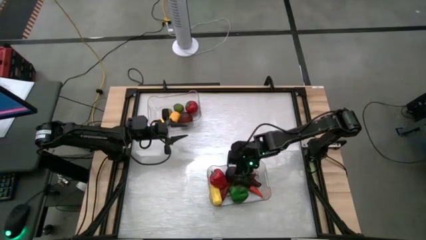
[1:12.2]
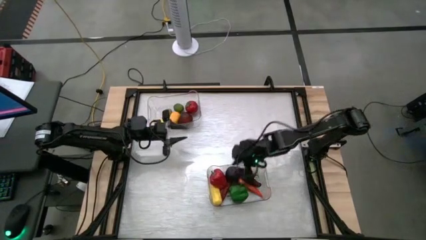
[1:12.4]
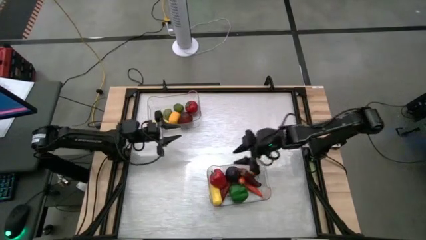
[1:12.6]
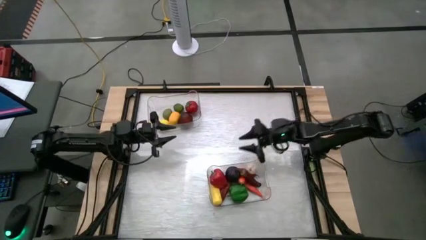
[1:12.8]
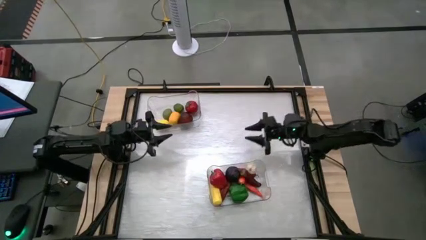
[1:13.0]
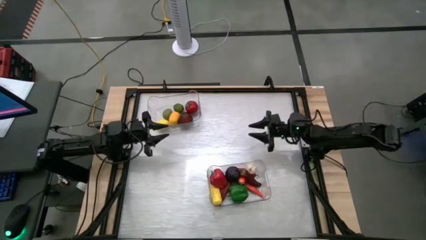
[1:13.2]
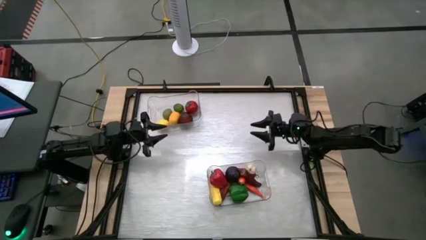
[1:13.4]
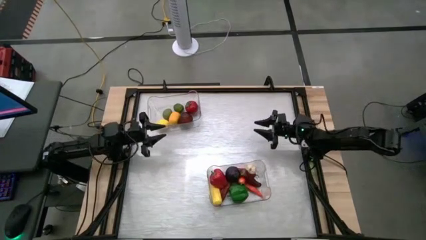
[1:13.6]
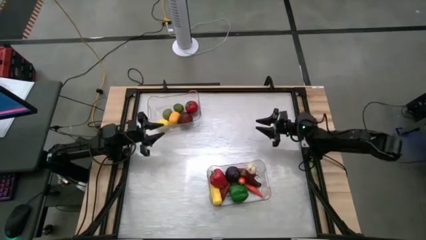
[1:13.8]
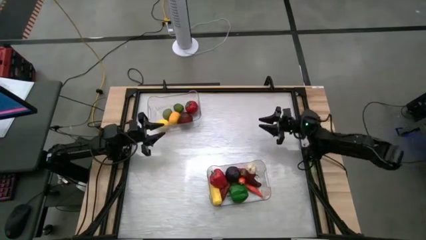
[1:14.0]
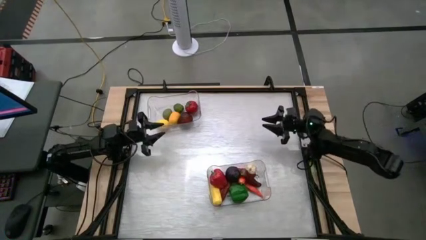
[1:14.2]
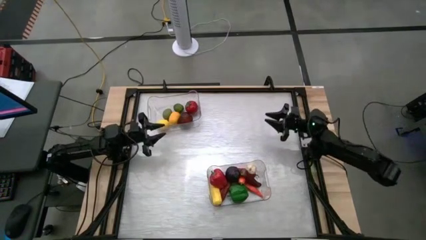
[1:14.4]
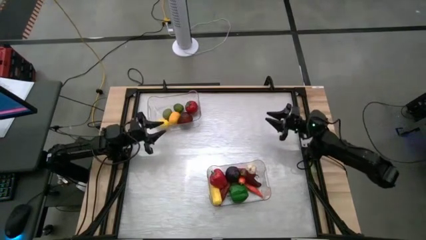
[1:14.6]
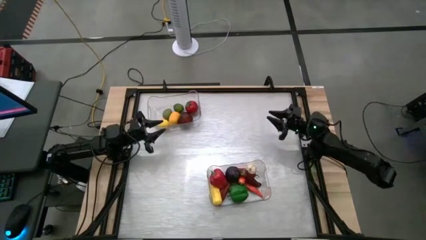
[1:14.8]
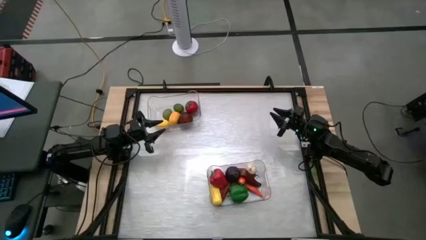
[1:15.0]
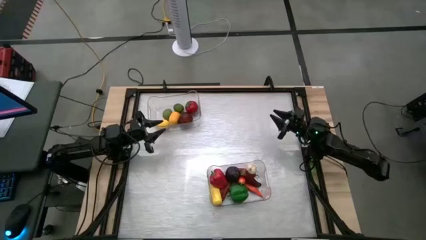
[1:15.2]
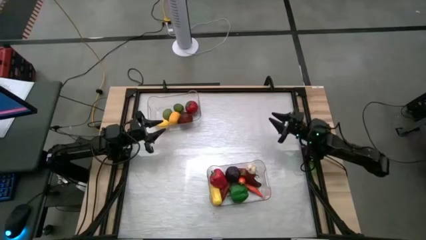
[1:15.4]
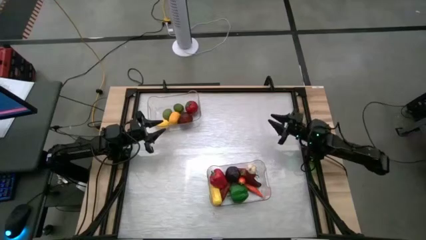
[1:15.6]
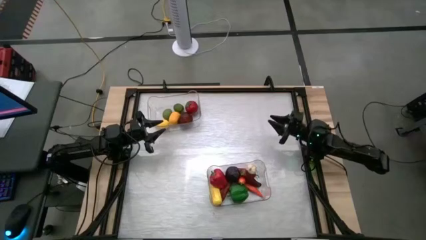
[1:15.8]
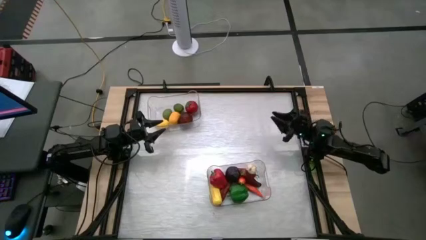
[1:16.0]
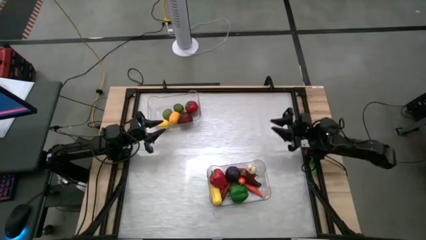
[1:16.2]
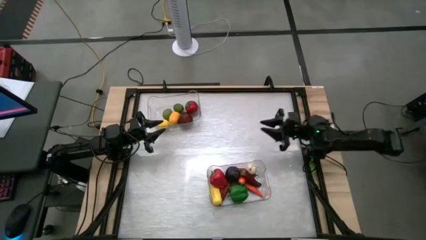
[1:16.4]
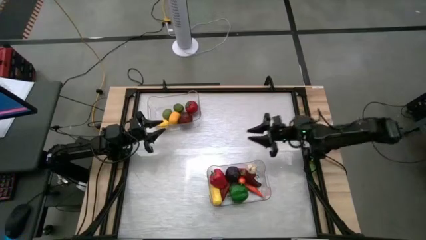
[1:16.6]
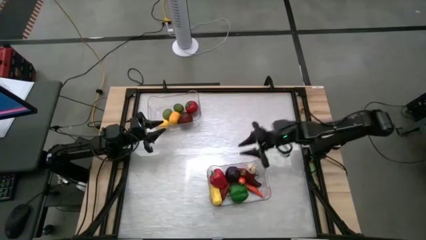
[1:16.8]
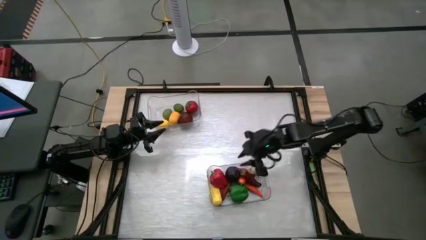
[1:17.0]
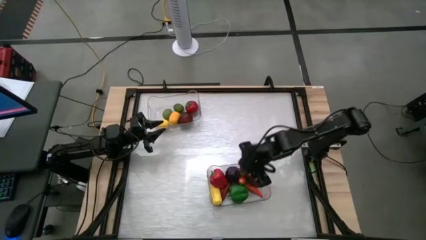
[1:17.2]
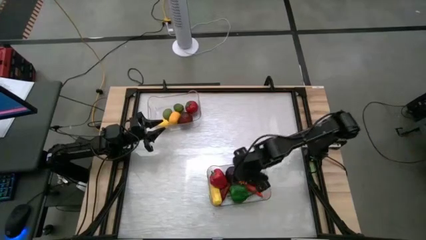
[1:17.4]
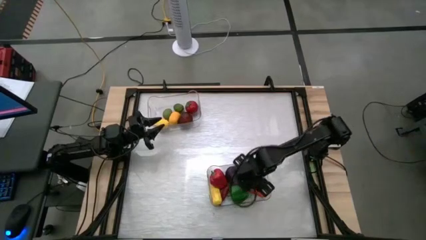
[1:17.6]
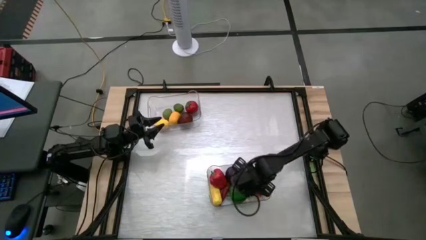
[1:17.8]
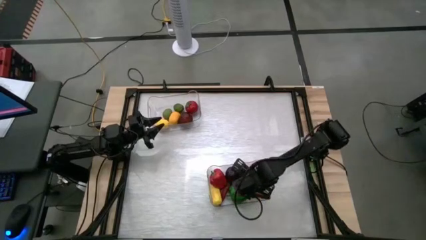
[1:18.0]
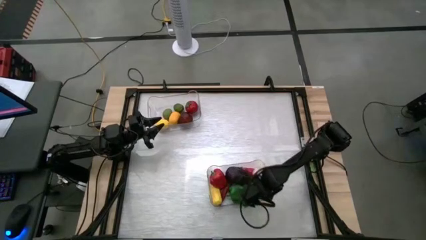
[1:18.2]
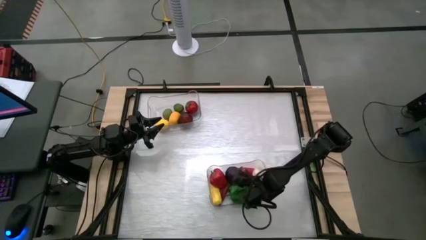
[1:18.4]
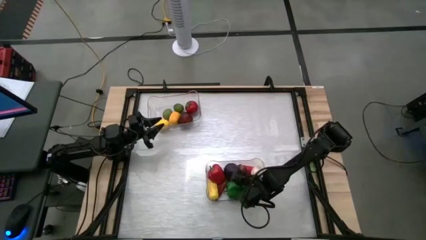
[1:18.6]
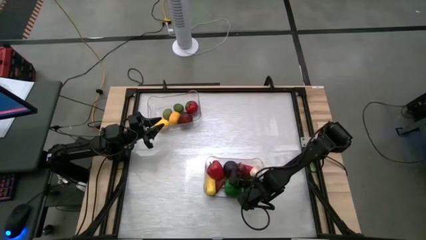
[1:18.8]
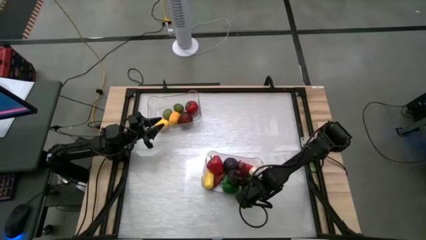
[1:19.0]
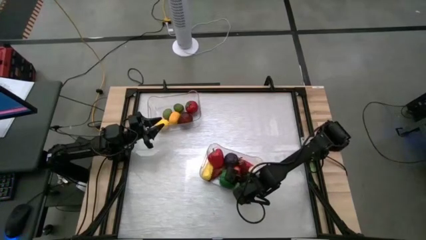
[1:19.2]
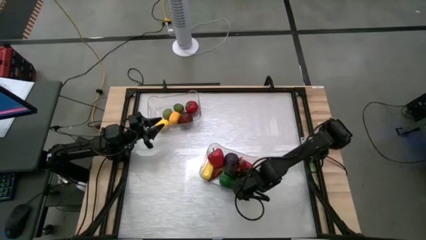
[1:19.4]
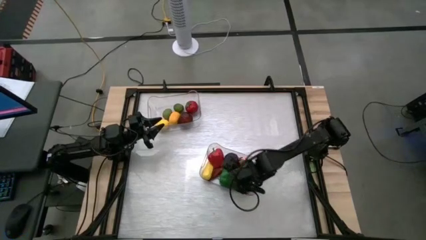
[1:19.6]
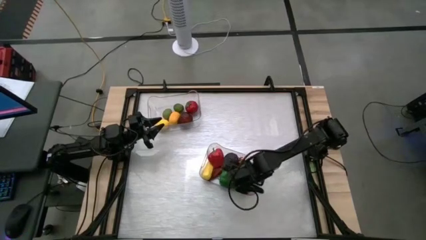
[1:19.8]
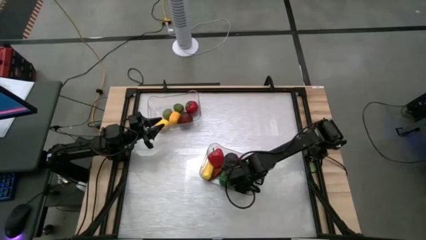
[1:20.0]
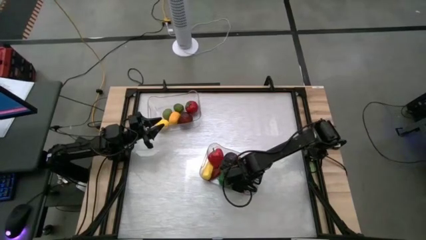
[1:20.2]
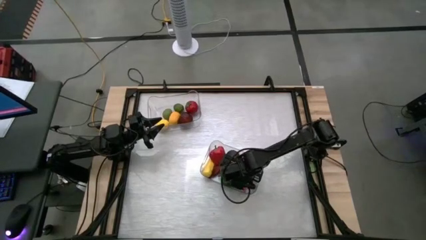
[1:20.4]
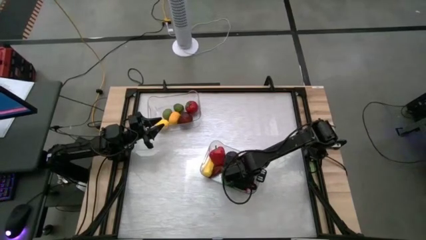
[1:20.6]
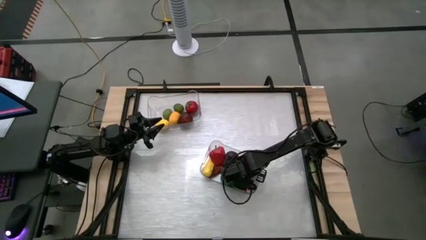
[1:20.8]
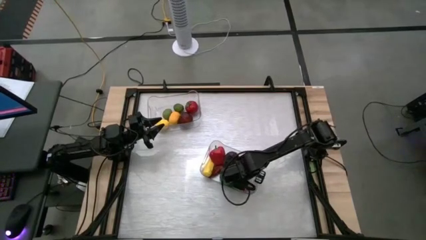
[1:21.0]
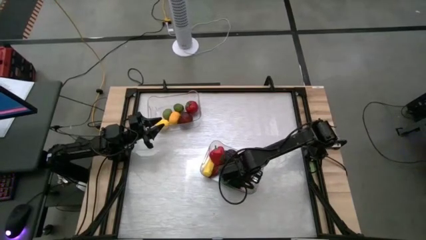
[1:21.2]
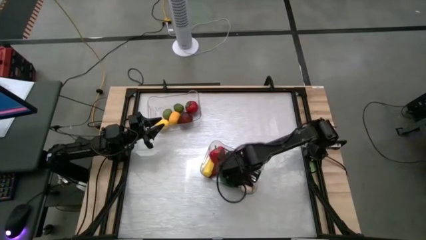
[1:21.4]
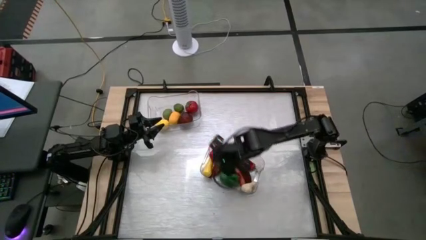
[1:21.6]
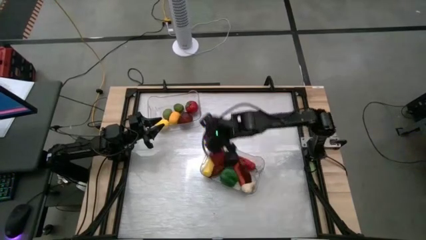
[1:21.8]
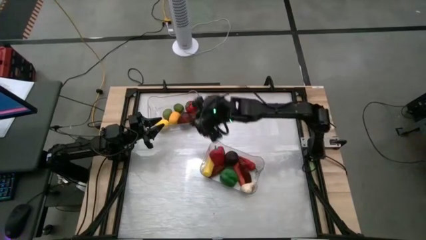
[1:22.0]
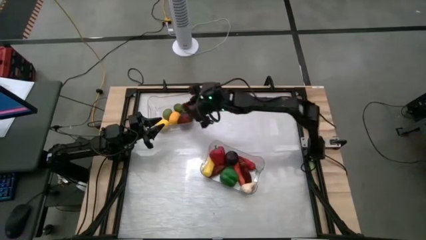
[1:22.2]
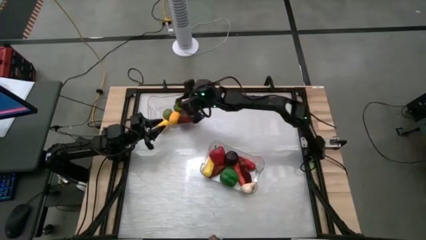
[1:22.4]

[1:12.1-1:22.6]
Task: Sort produce into baskets
Put the peach from the top transparent bin

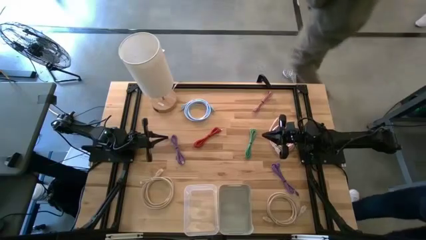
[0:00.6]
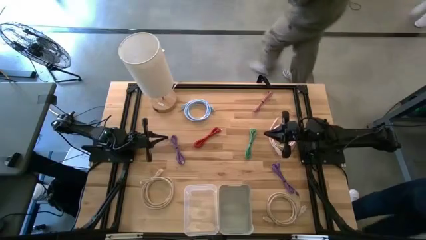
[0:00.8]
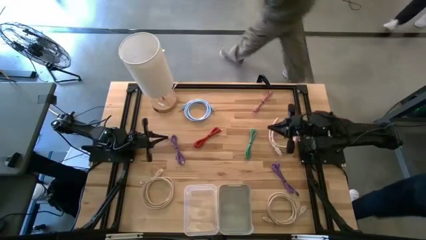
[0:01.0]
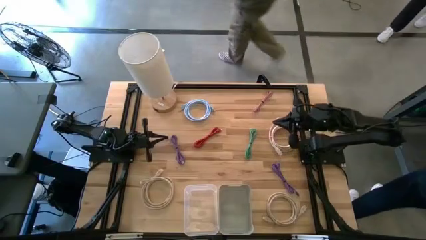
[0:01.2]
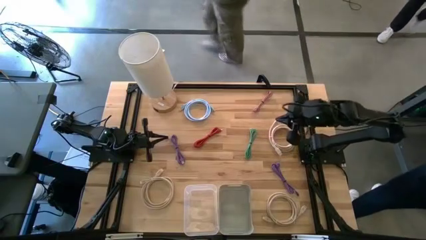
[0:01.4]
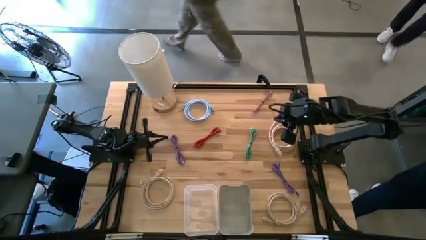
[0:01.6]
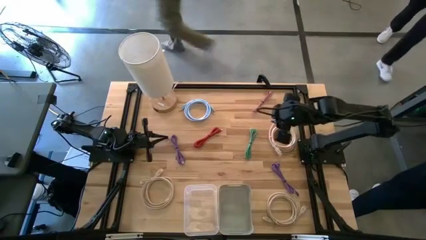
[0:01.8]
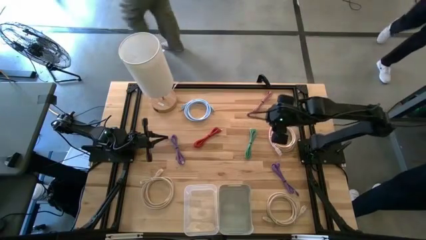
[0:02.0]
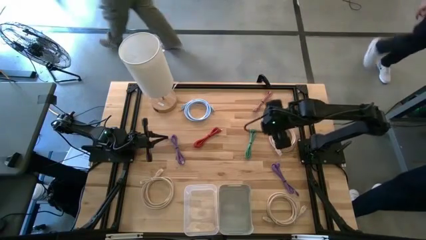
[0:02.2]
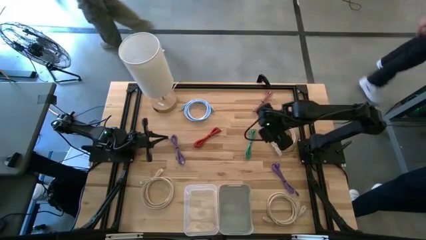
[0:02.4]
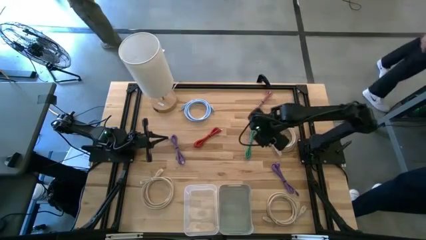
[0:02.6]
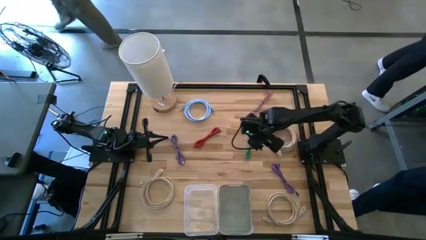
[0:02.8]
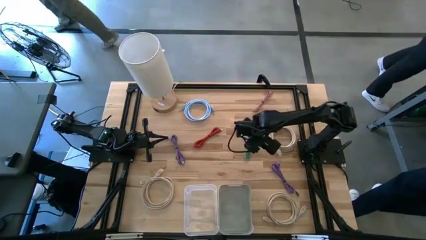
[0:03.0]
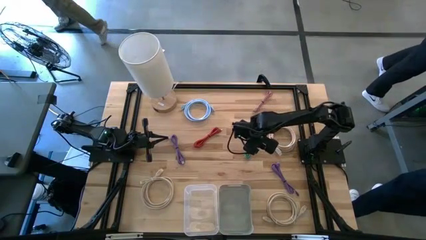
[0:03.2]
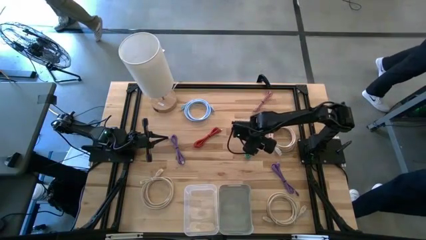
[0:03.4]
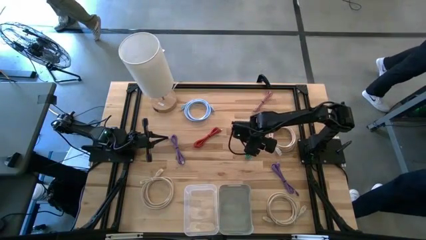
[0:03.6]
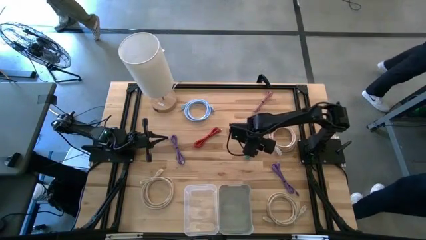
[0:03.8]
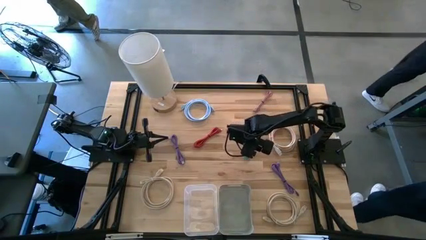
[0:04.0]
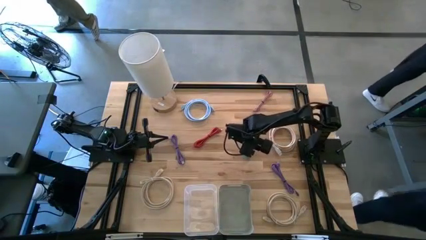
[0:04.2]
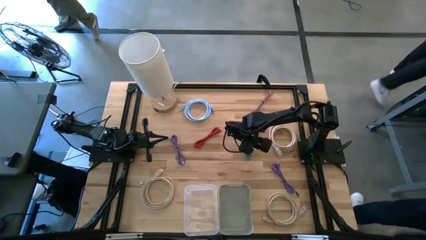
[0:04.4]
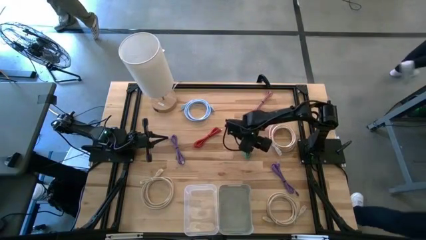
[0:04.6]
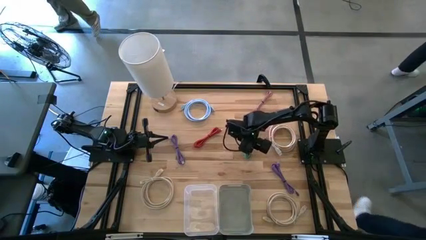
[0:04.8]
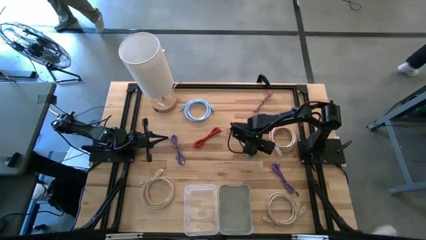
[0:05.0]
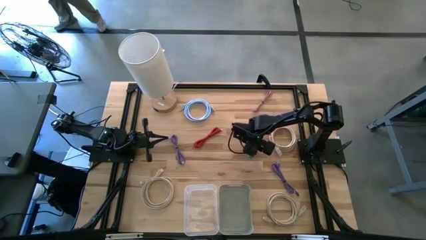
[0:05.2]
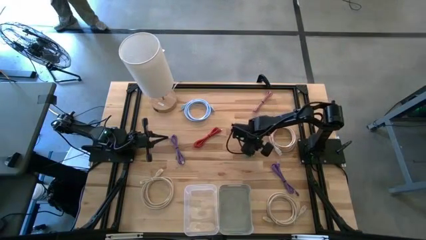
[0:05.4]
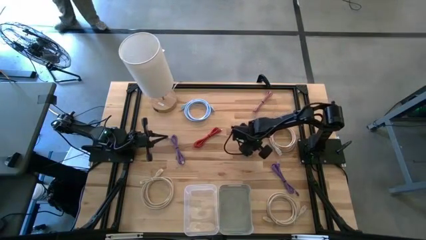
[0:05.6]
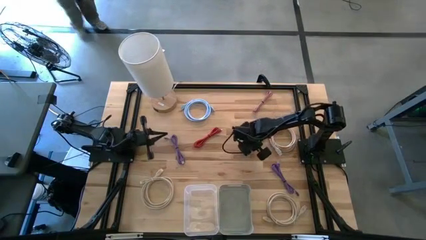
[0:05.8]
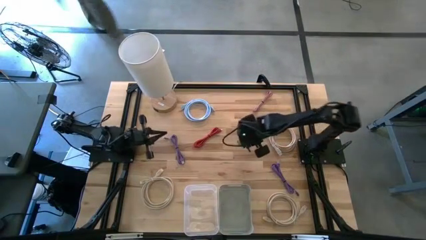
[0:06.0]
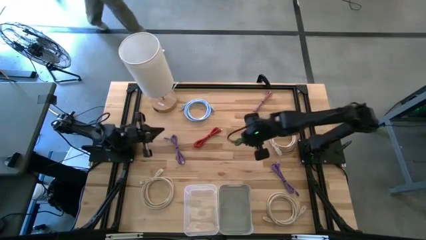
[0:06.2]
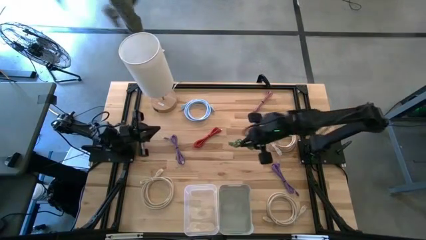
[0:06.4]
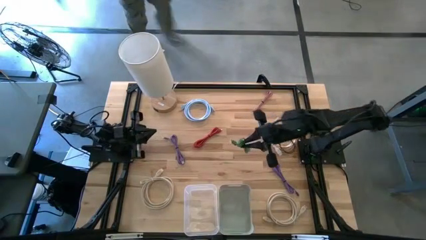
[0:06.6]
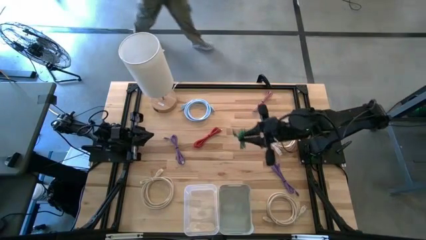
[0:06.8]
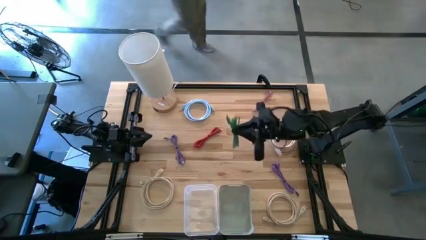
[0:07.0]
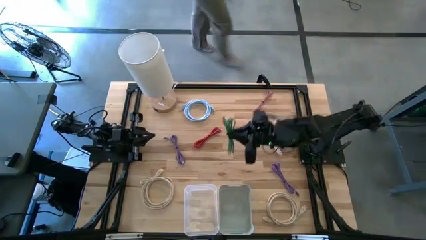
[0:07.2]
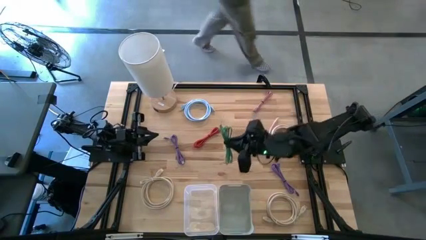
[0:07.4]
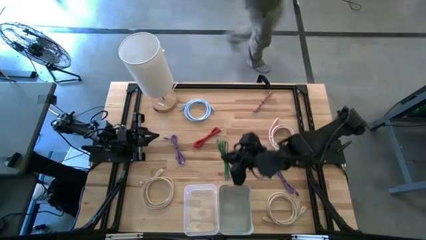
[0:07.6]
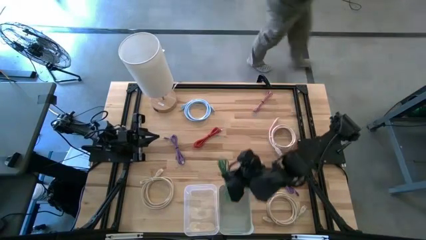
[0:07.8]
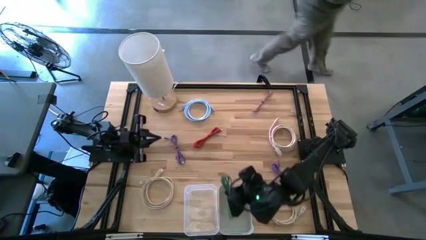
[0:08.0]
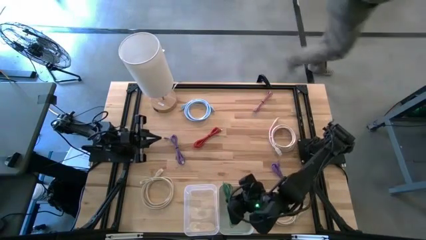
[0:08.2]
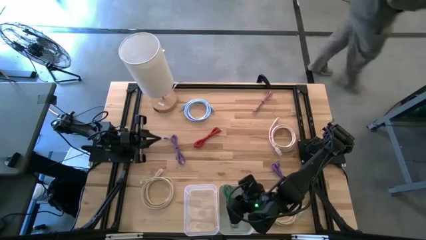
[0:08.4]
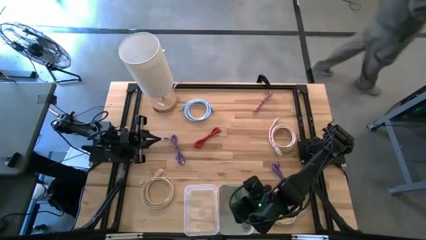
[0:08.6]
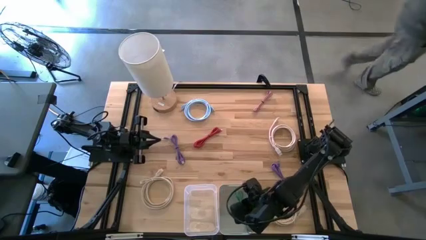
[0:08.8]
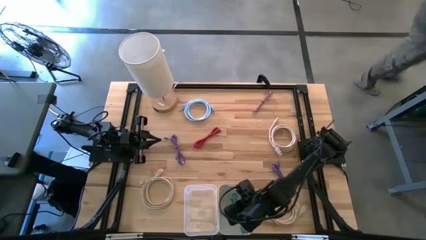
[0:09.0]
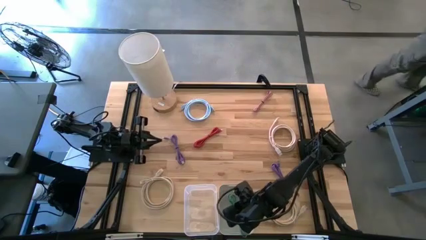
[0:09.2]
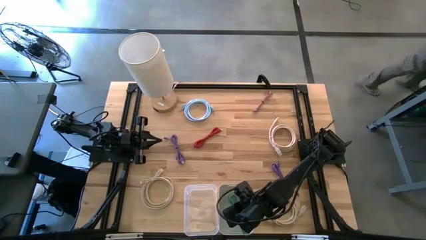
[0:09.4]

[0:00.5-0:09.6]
Task: Pick & Place USB Port
Put the green USB cable into the white bin
